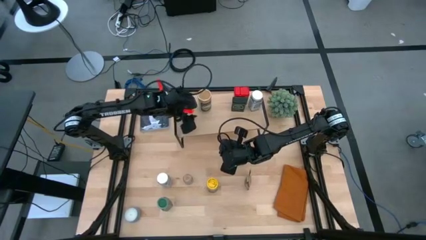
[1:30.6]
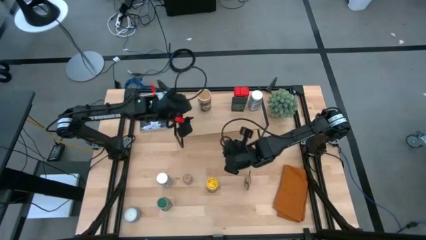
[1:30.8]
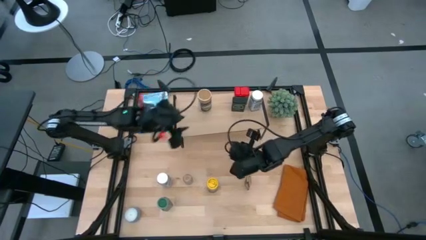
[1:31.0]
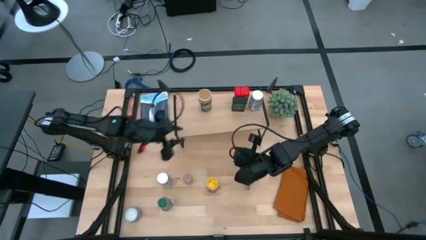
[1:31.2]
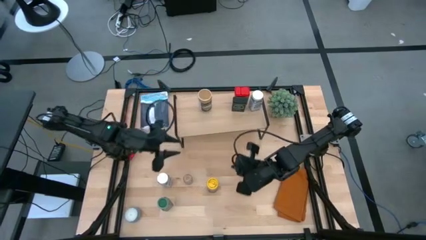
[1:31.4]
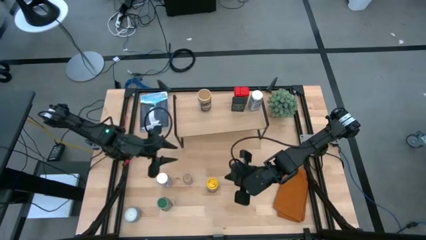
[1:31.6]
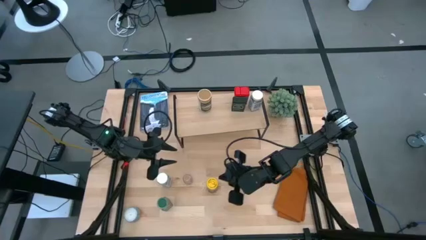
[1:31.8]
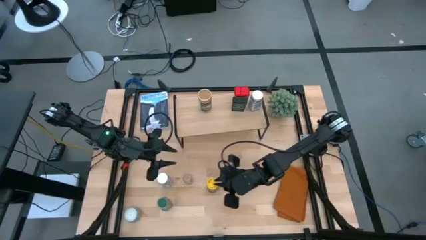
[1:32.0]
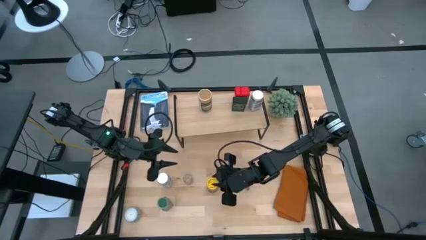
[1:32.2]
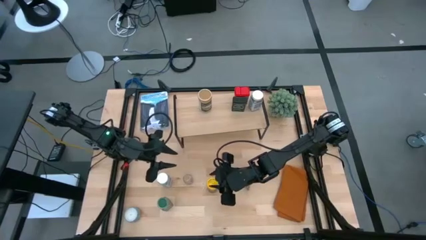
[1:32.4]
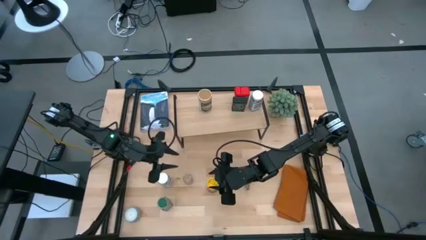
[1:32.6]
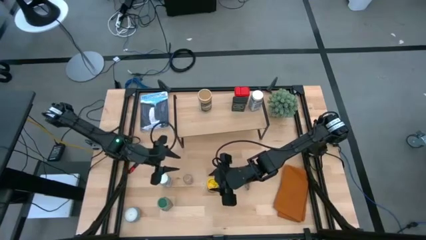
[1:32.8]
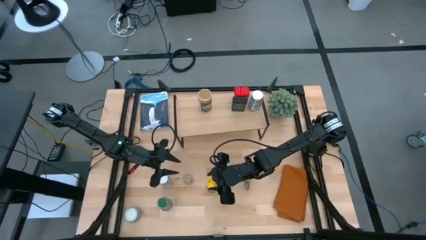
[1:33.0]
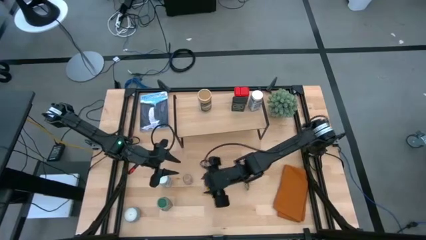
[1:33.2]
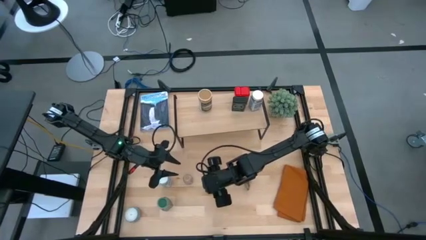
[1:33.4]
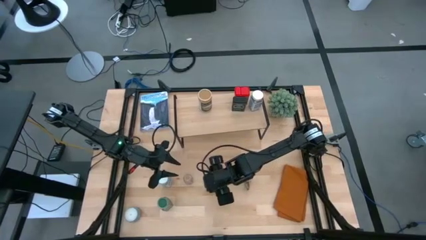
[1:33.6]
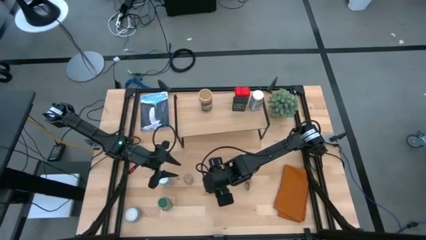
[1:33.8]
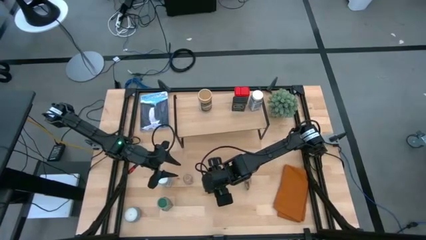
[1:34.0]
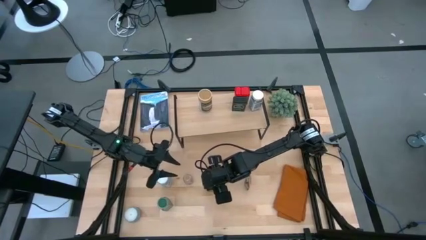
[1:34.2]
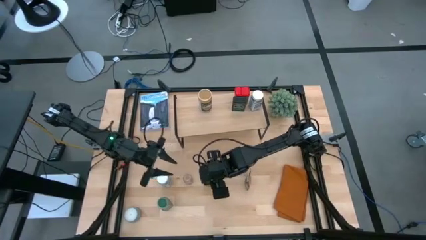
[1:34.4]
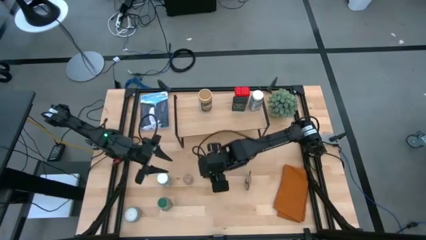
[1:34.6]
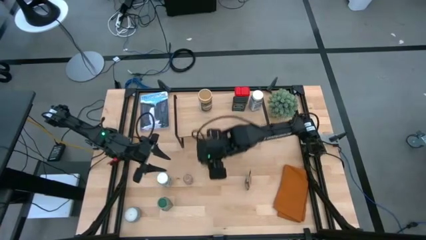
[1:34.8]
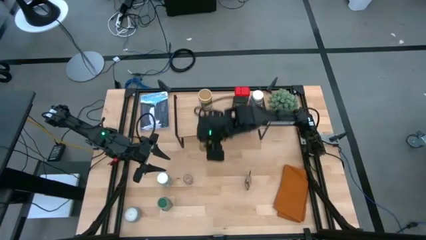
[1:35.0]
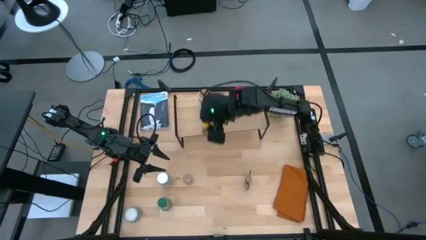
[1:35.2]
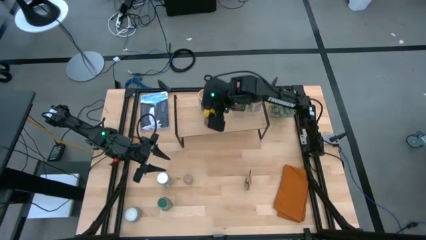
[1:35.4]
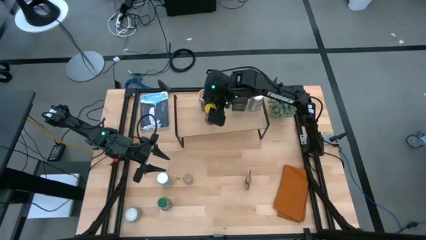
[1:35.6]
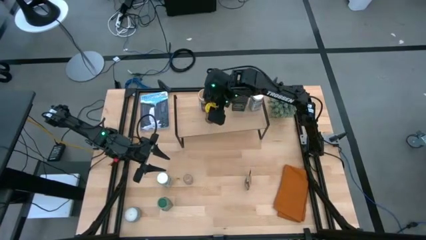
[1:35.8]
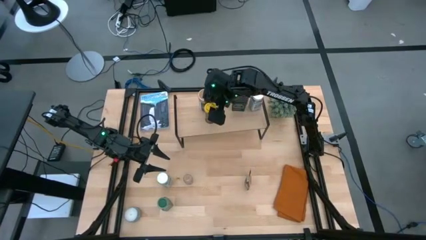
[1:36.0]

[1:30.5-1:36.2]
Task: Shelf spices
Put the yellow seasoning bottle on the shelf

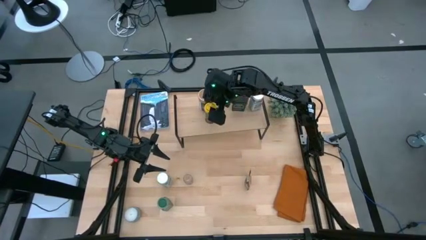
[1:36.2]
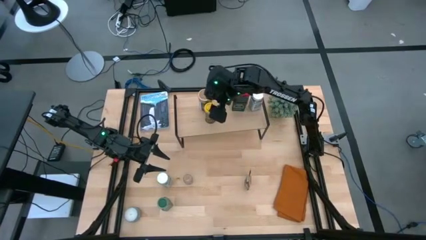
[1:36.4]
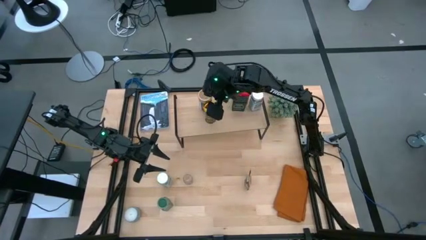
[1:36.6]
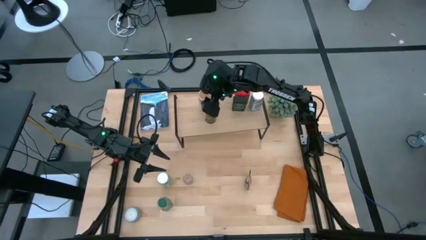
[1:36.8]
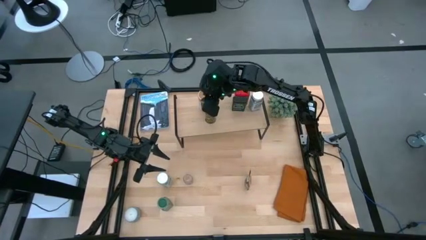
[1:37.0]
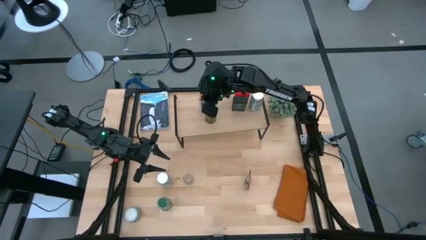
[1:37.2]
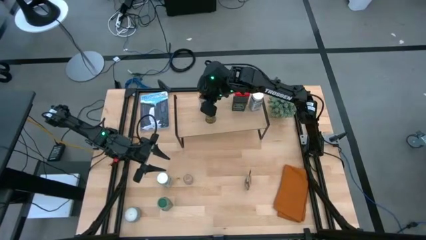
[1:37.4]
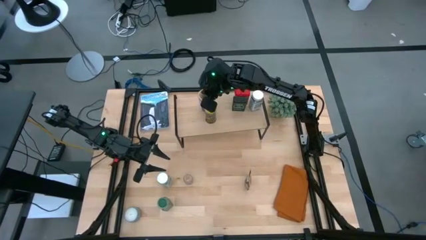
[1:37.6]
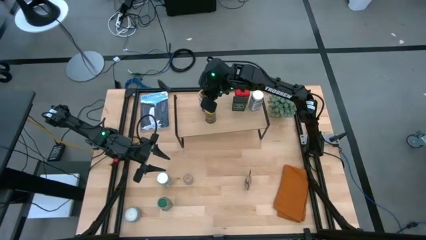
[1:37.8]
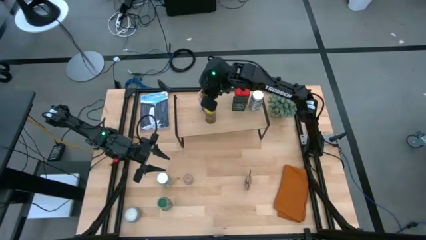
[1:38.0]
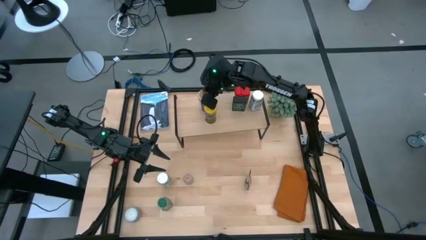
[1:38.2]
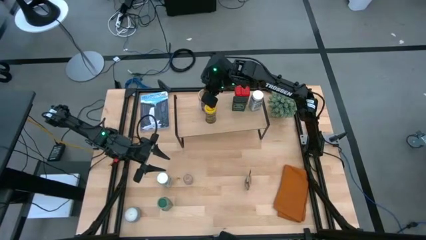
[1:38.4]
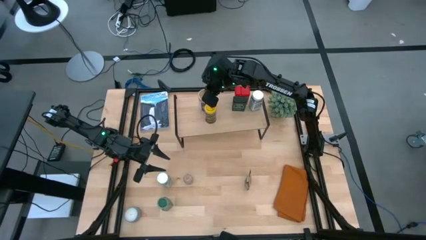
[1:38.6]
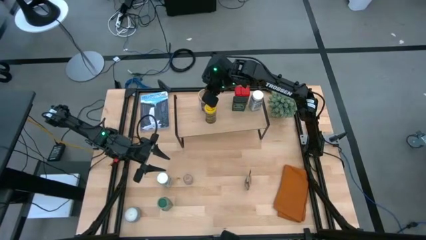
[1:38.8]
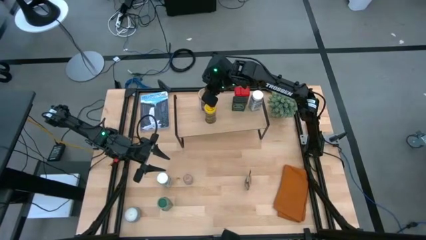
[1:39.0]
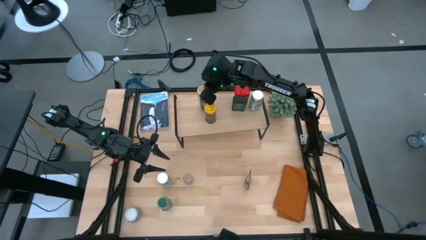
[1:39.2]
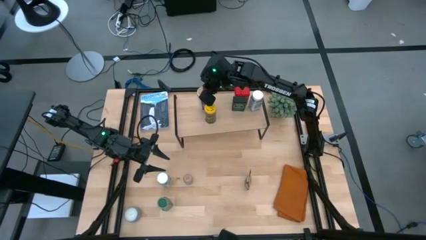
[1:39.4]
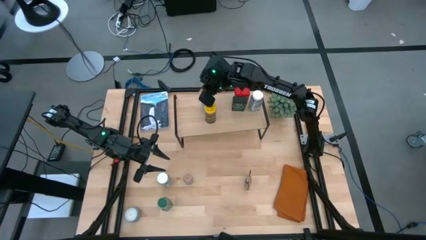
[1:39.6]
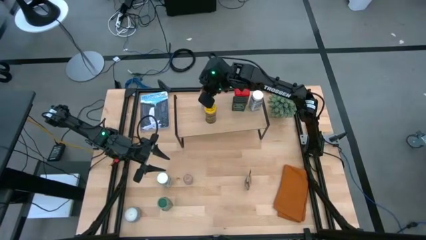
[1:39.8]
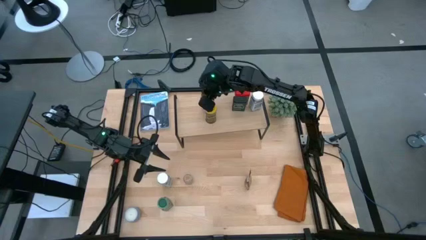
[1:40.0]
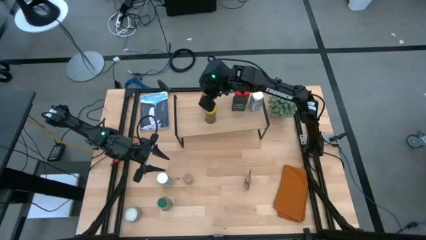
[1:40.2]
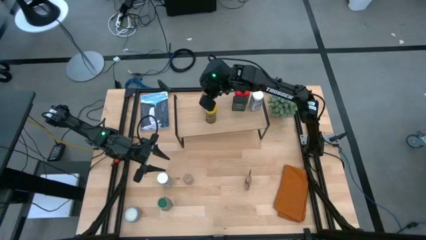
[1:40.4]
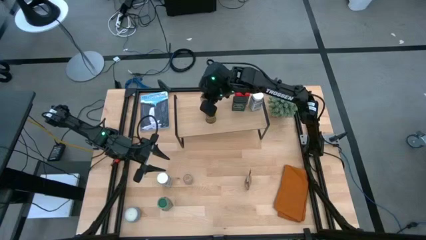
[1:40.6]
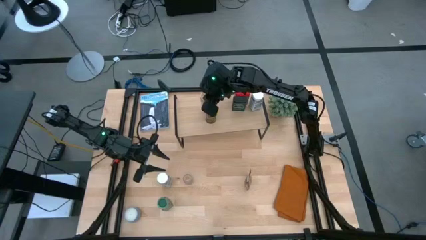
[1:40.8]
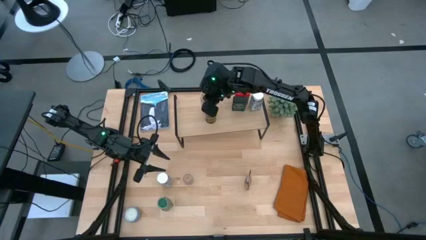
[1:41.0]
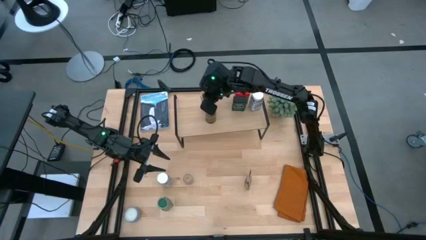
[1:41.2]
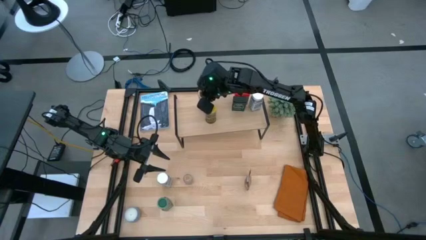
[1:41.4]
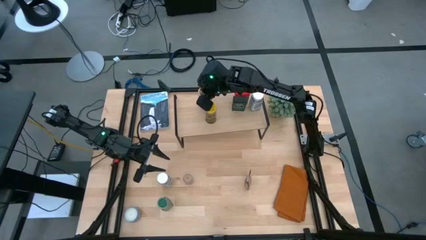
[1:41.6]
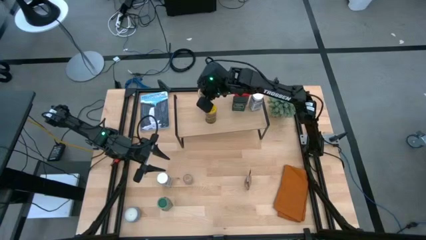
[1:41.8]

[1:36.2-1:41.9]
Adjust the golden seasoning bottle on the shelf
